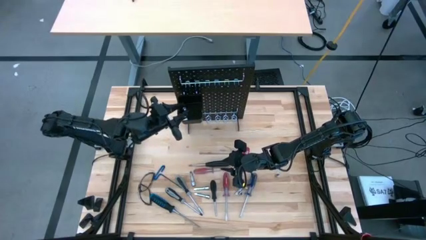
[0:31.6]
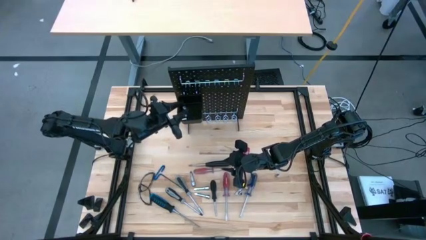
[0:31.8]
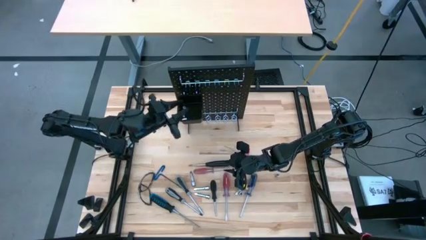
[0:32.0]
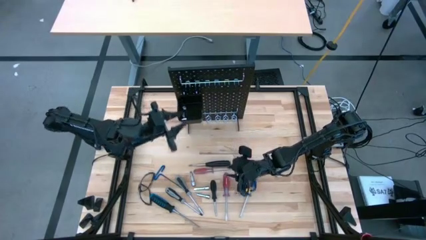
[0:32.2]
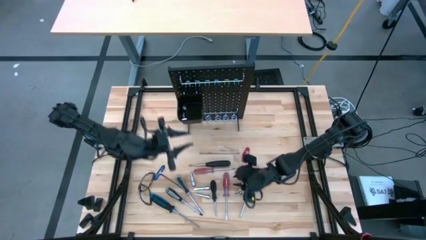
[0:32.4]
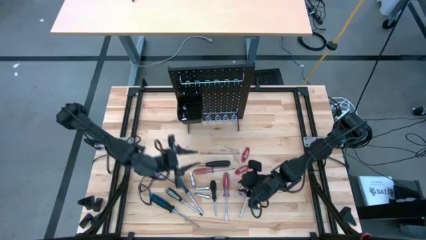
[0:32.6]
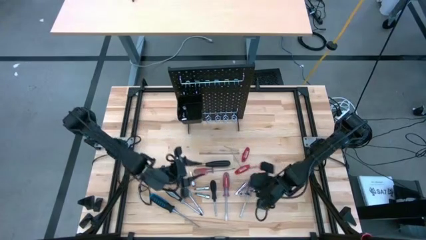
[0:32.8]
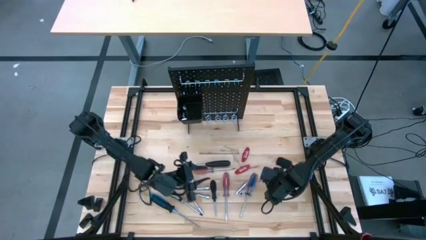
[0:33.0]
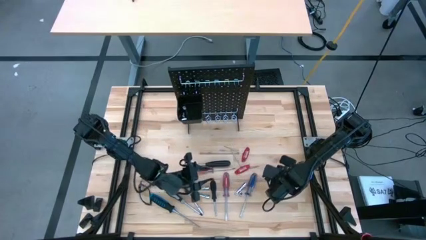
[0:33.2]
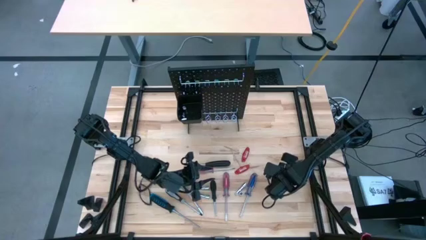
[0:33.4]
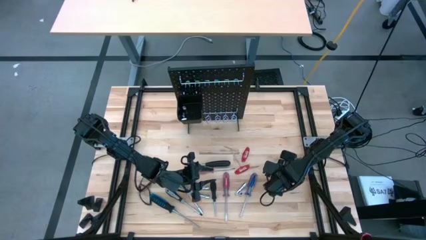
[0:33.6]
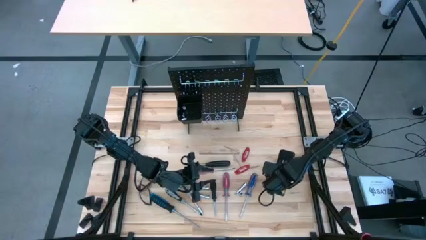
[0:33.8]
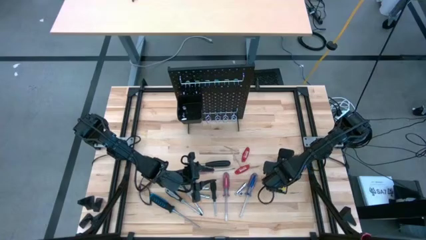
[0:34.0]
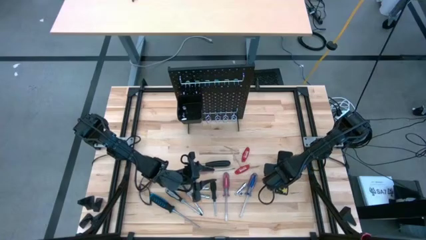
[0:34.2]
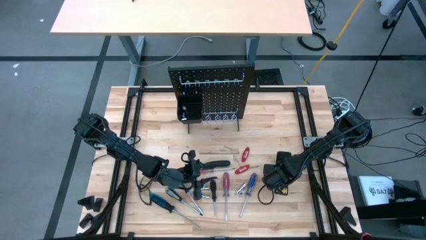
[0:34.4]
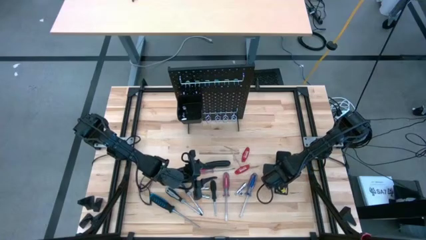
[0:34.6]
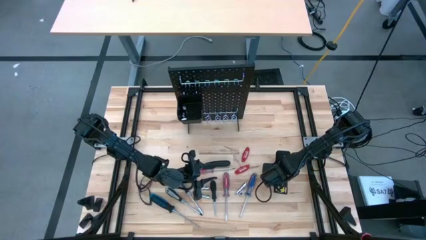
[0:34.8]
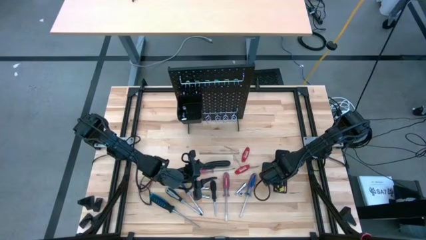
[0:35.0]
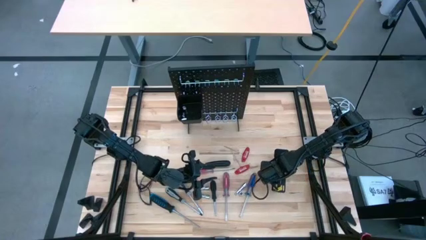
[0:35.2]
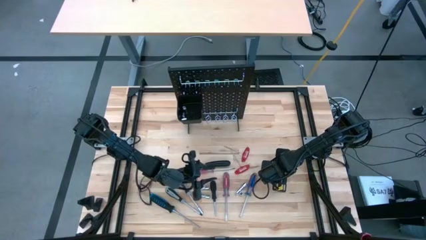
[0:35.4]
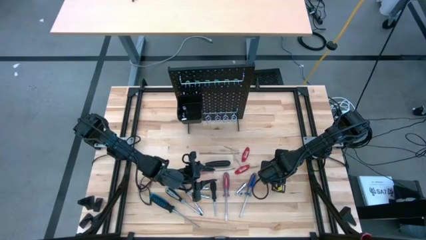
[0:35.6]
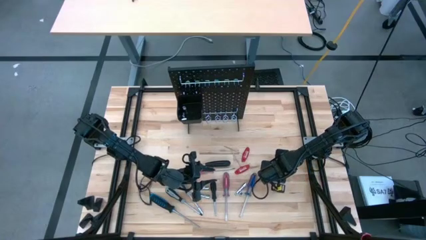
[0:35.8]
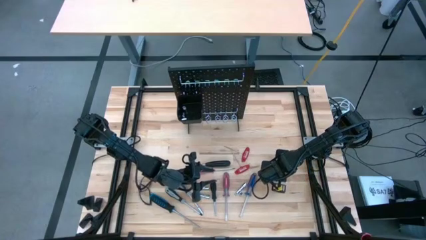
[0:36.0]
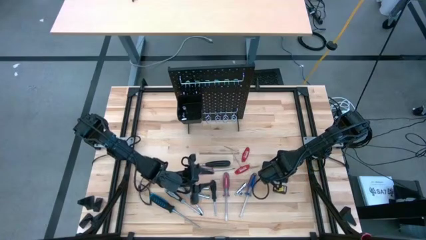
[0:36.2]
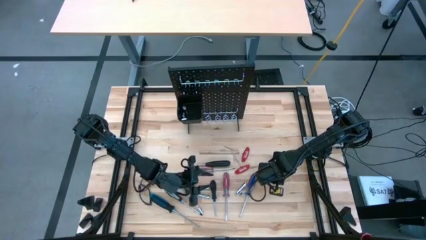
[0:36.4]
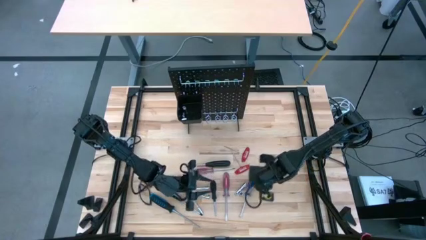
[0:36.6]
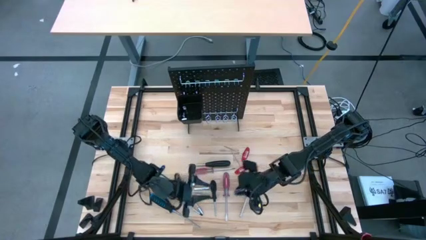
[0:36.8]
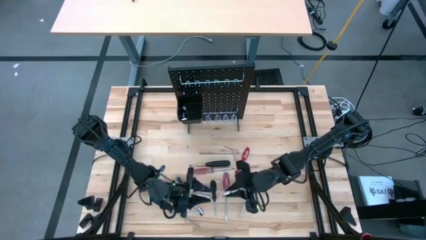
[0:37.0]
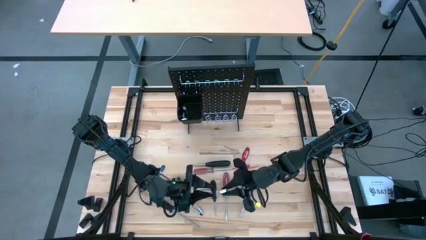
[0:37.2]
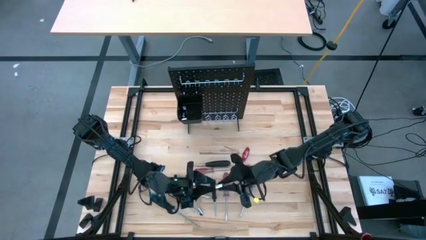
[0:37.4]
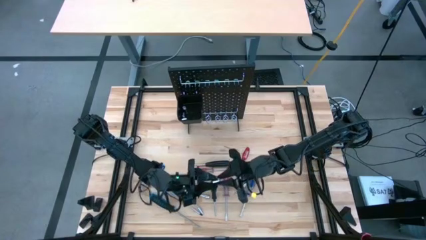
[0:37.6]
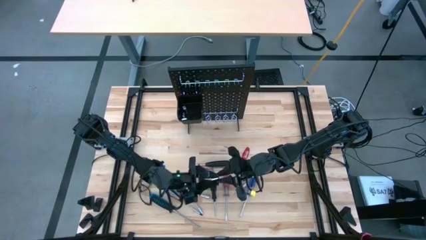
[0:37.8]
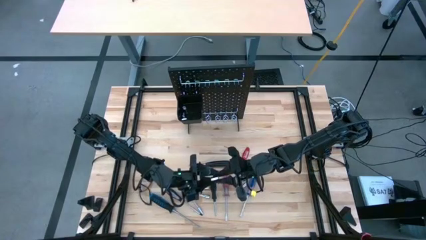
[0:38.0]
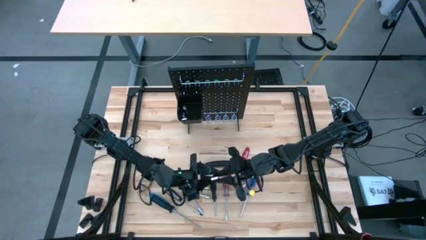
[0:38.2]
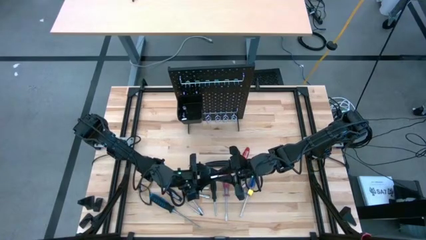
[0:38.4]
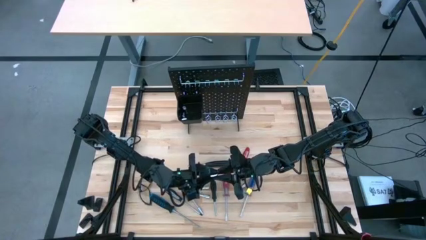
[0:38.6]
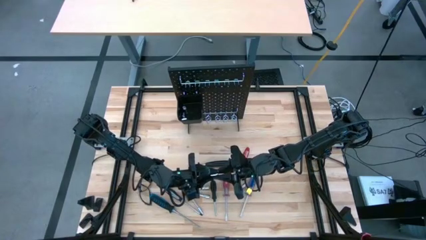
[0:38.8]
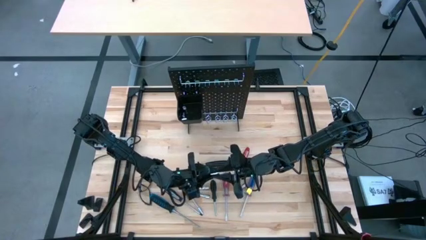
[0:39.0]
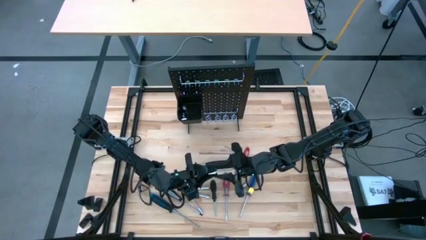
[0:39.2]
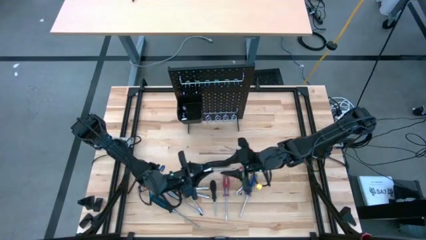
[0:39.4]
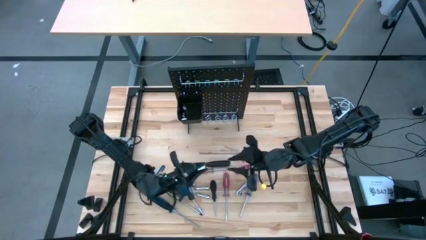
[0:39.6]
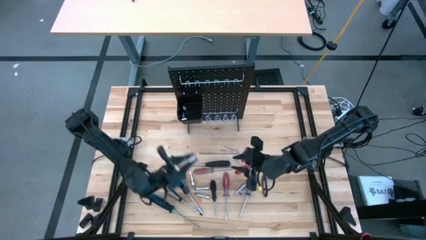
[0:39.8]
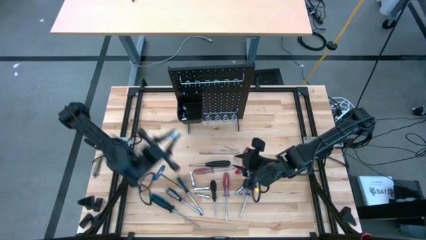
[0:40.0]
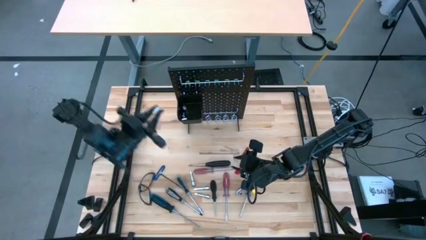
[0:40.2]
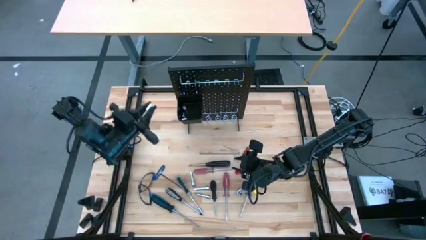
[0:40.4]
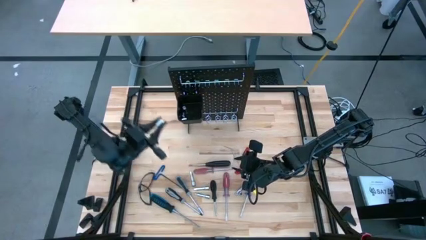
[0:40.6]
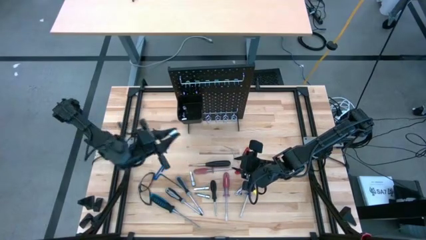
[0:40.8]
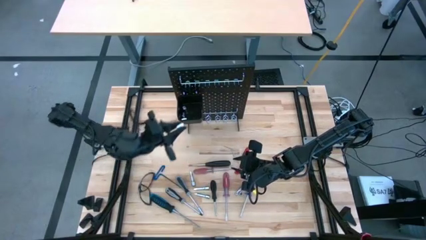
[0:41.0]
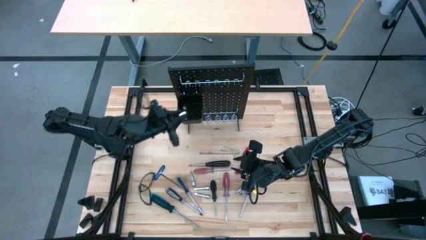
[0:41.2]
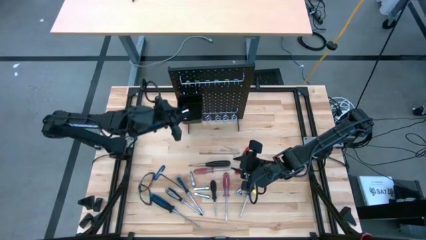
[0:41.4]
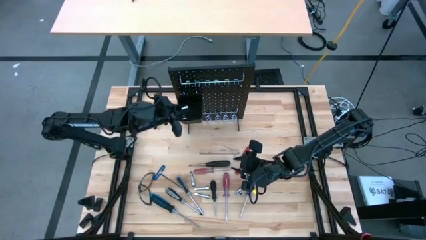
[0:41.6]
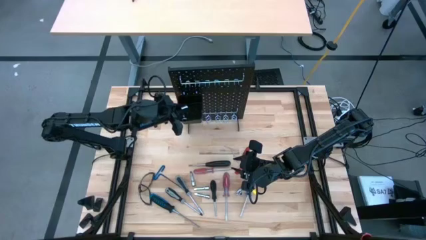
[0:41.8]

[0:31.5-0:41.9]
Task: Hang tools onto peg board
Put the socket into the black bin on the pegboard

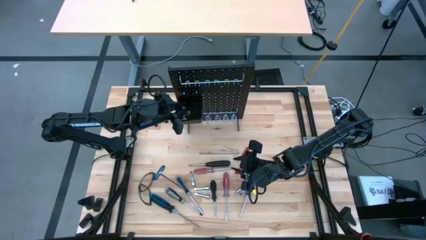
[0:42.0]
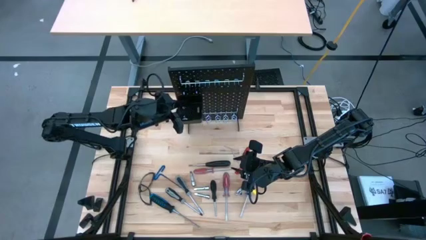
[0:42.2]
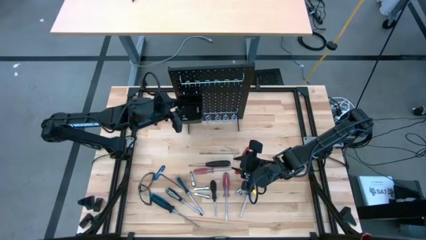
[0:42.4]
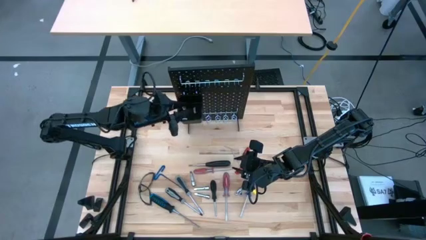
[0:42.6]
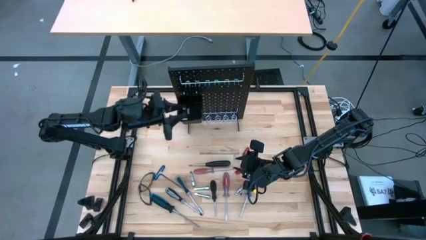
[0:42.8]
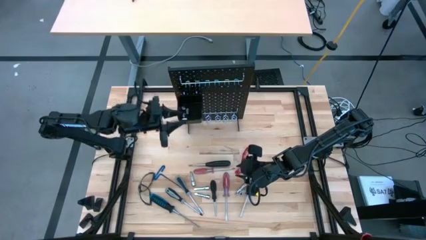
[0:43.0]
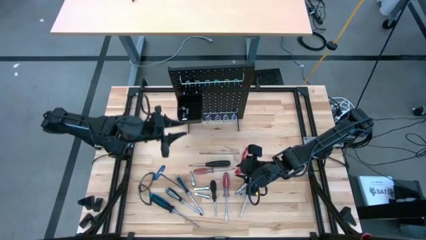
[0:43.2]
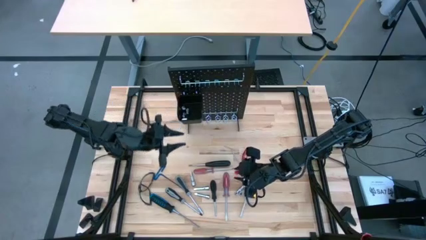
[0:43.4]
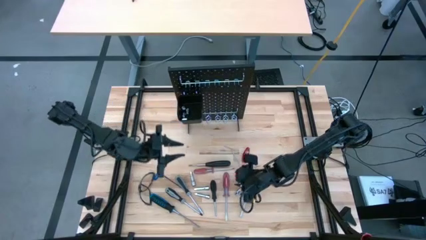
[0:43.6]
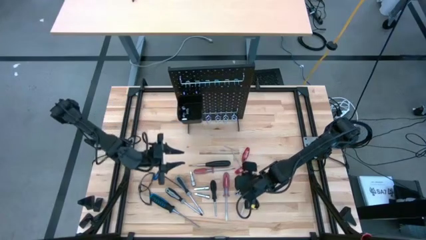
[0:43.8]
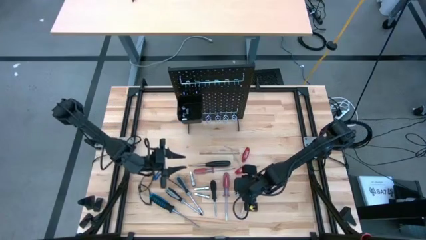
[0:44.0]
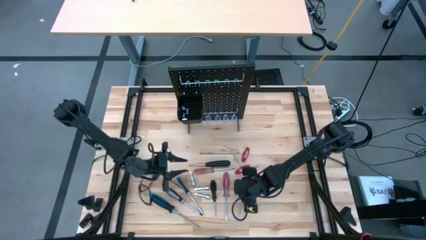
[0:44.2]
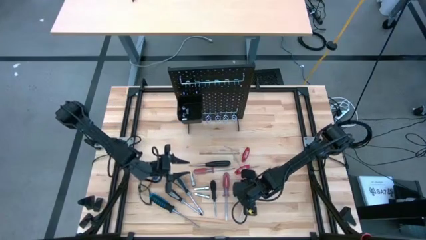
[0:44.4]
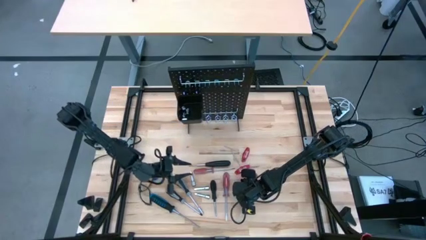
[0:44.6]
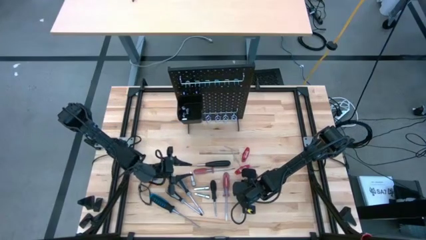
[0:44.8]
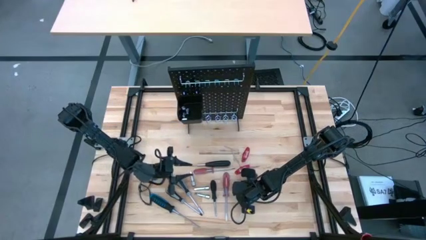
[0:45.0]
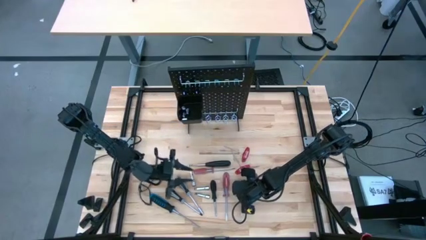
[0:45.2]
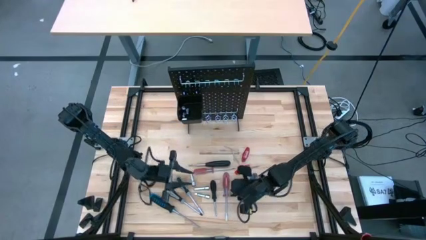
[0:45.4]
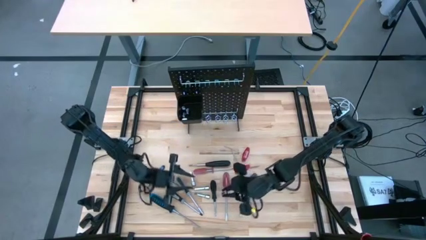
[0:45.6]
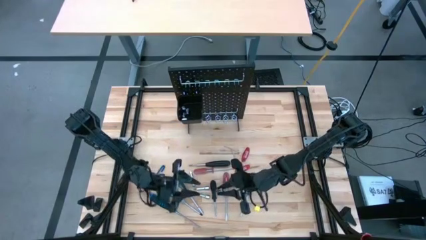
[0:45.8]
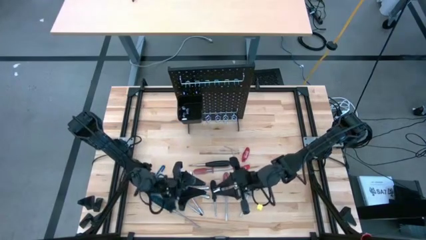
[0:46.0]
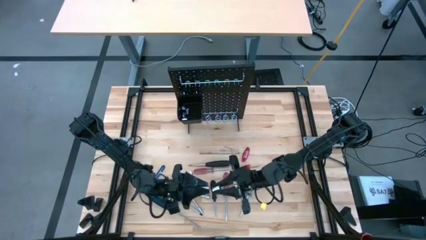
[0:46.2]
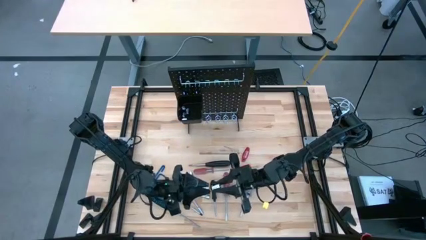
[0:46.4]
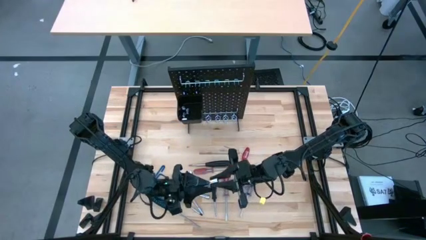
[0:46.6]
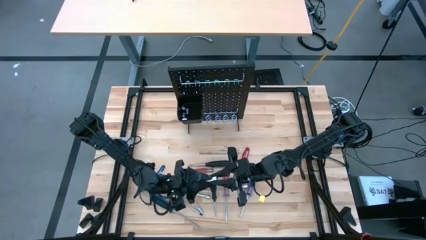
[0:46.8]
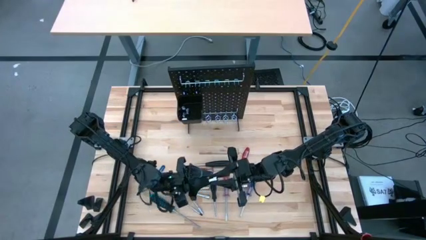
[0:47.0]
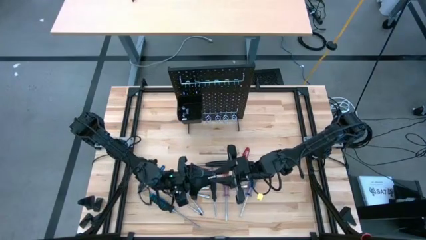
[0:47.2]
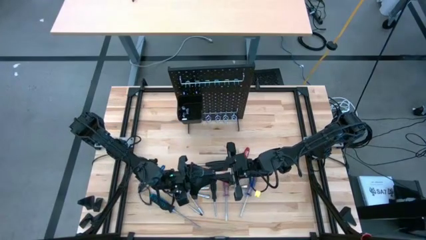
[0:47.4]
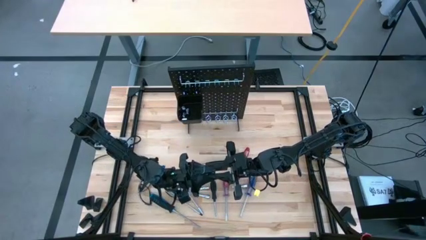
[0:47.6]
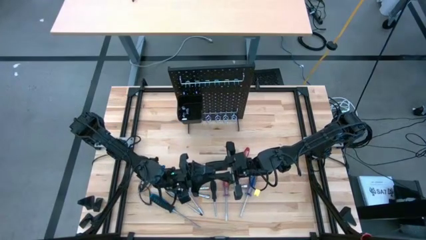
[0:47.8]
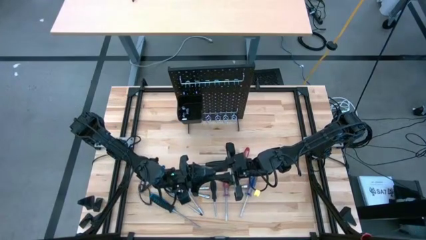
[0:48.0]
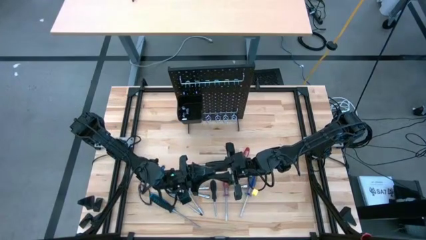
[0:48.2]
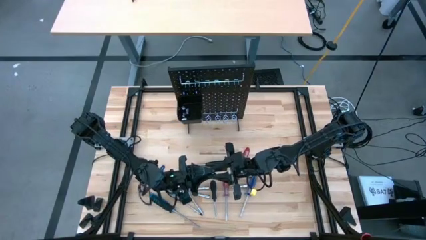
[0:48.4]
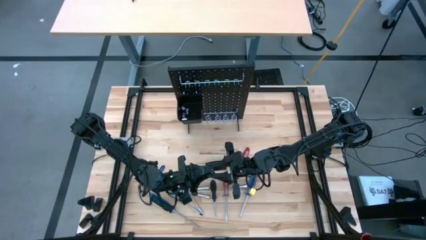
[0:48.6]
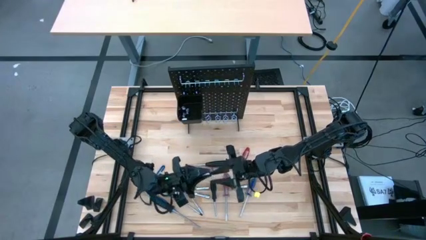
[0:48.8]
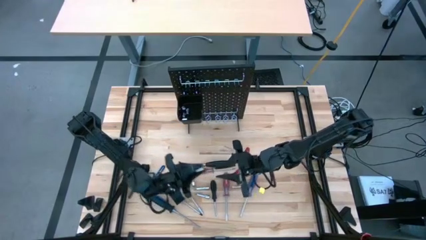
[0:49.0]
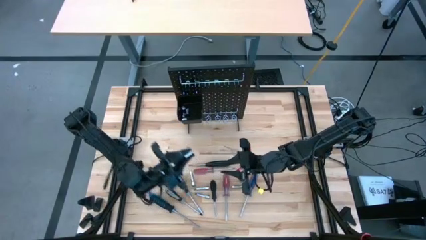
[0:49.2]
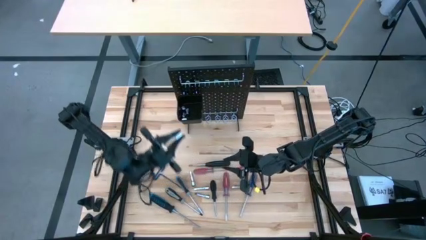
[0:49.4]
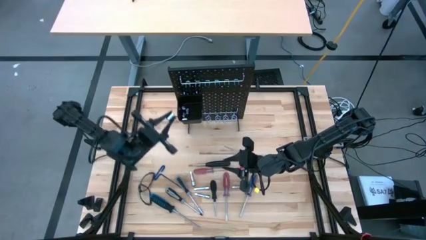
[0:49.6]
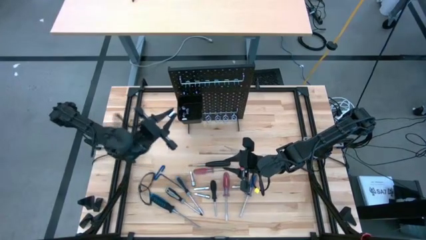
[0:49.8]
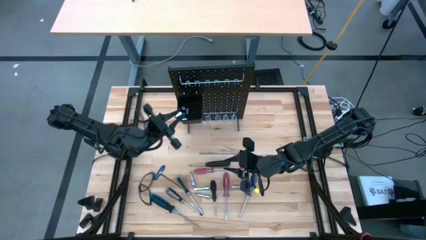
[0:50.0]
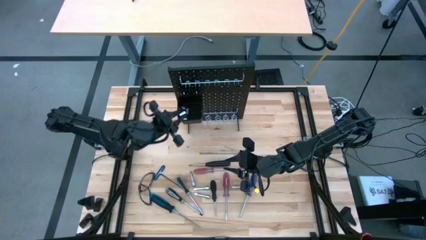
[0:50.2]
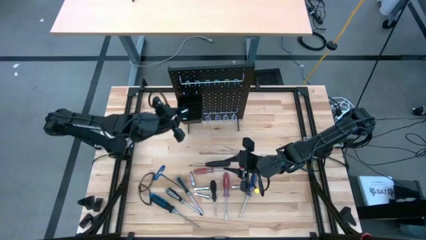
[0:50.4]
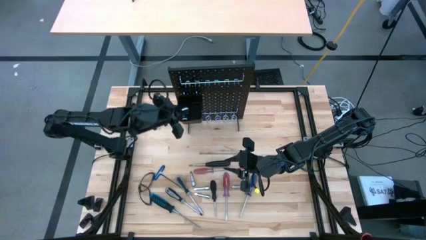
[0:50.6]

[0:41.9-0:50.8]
Put the socket into the black bin on the pegboard
